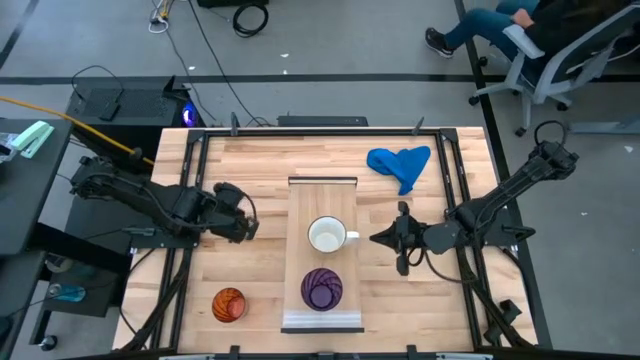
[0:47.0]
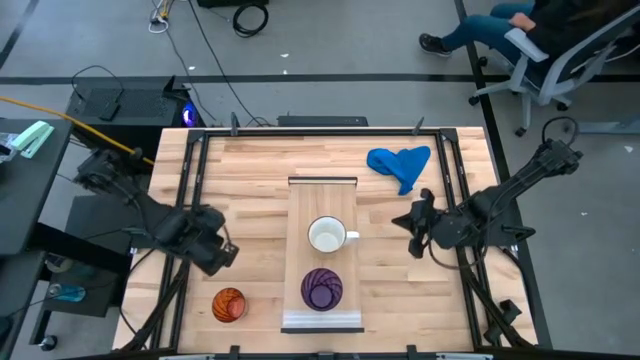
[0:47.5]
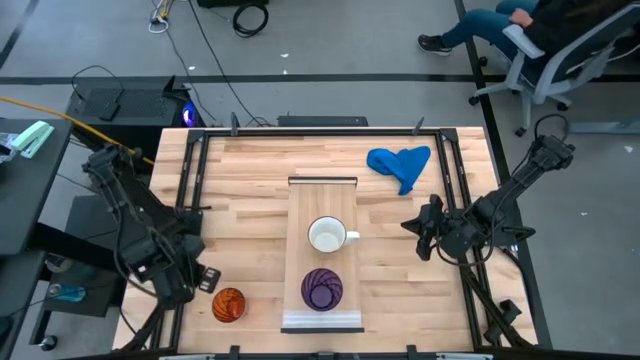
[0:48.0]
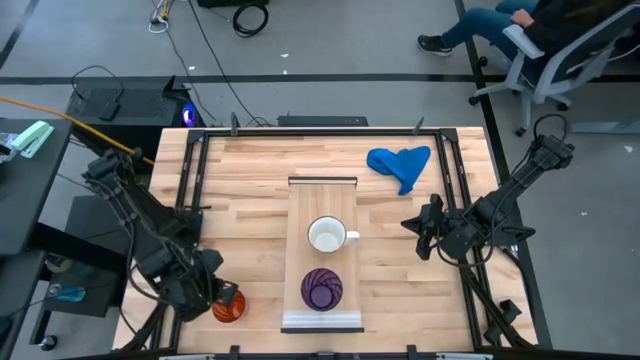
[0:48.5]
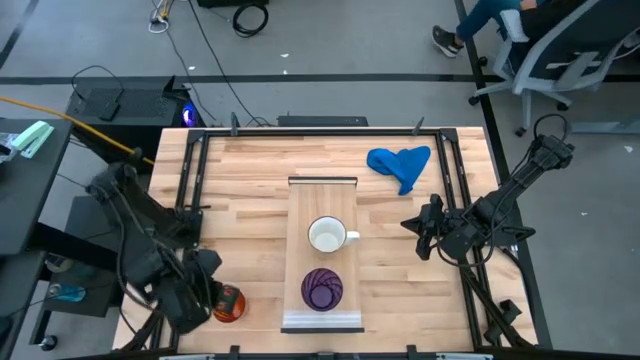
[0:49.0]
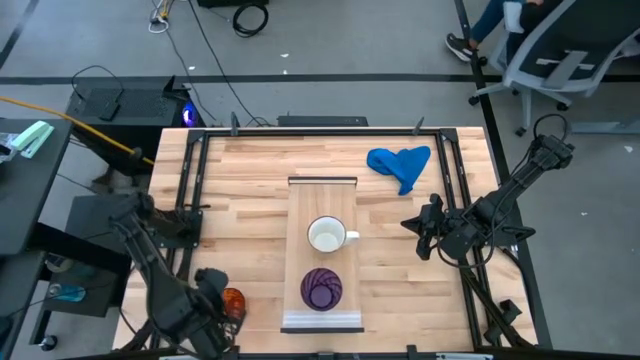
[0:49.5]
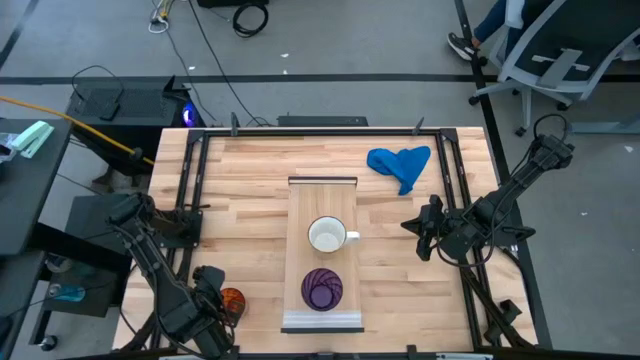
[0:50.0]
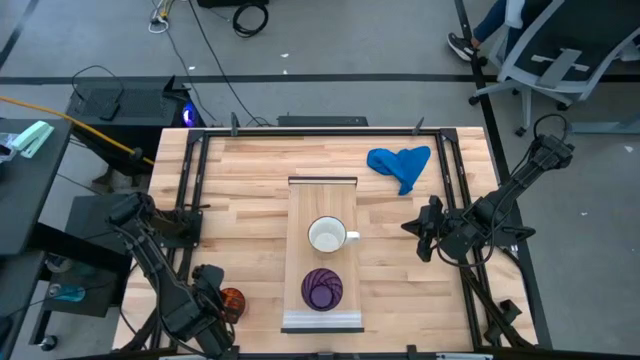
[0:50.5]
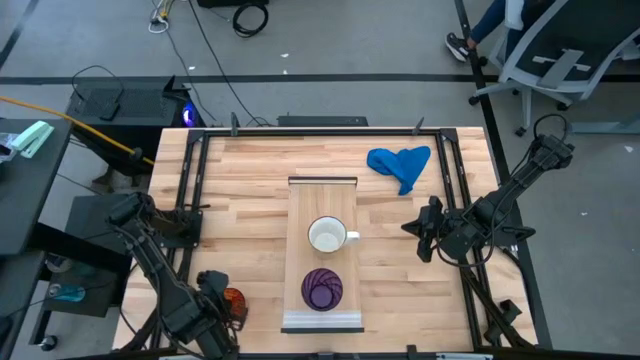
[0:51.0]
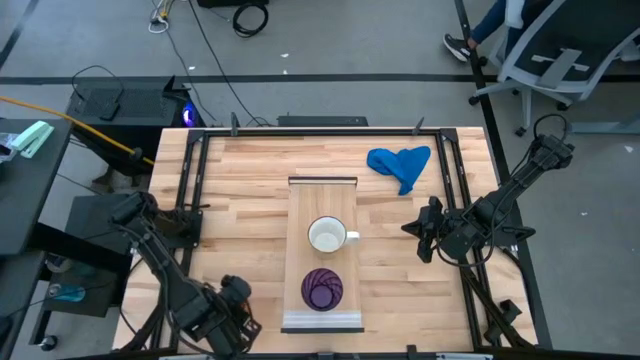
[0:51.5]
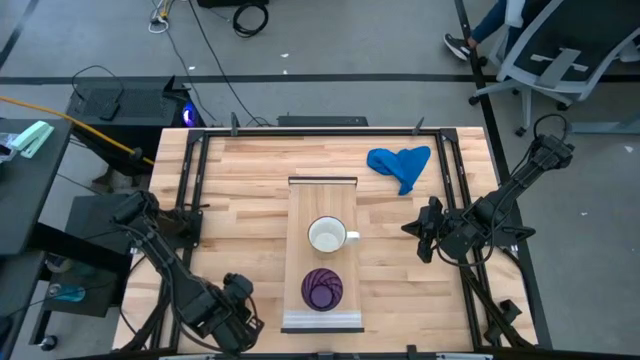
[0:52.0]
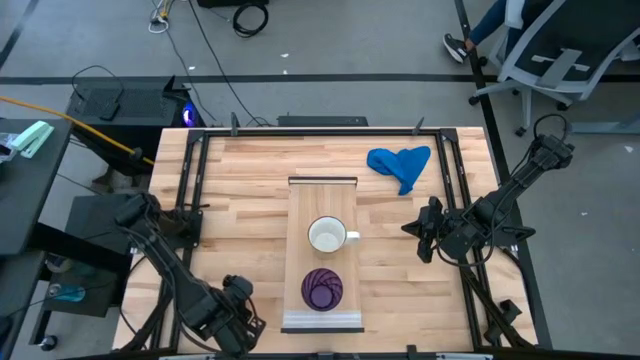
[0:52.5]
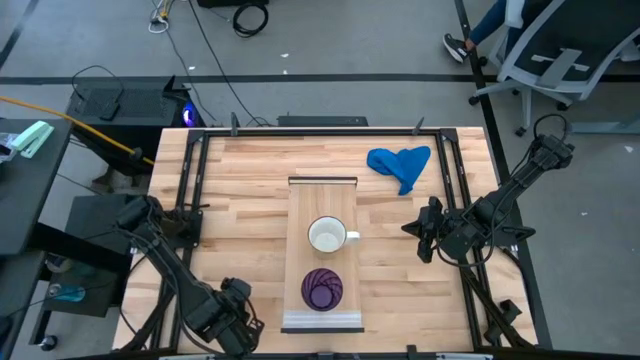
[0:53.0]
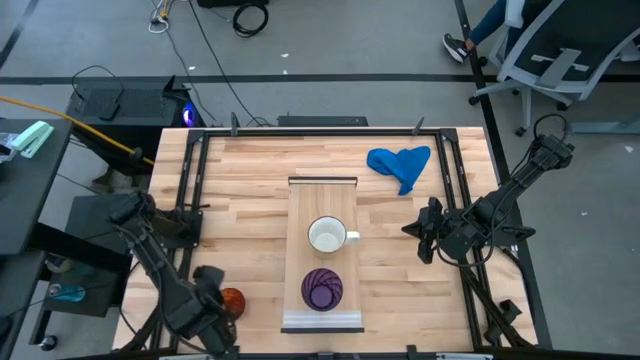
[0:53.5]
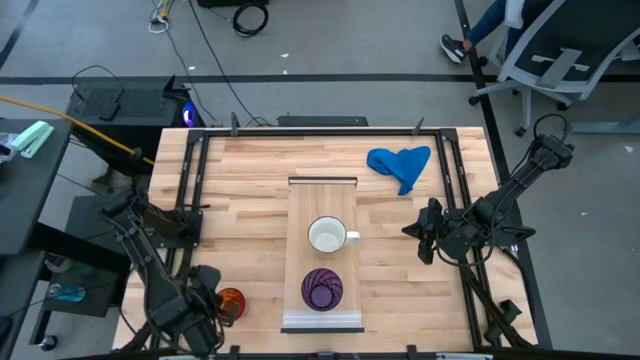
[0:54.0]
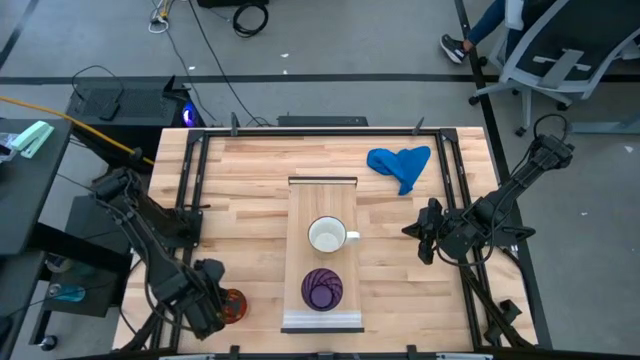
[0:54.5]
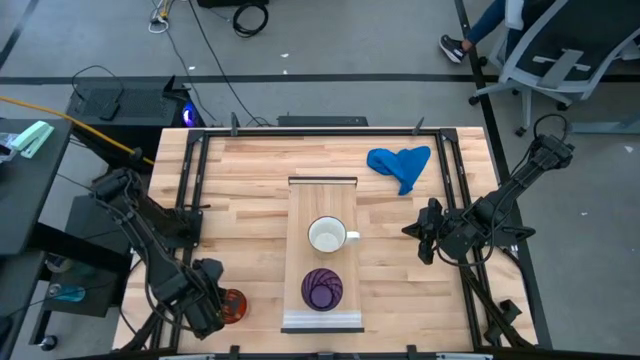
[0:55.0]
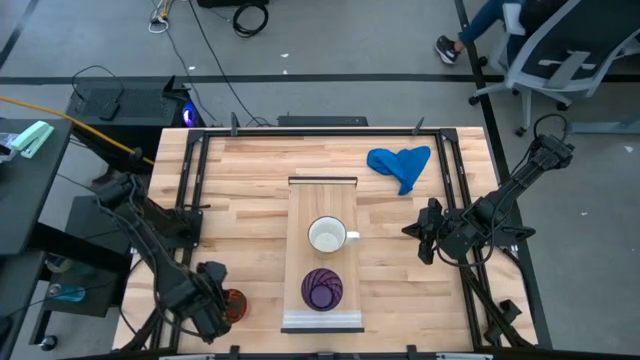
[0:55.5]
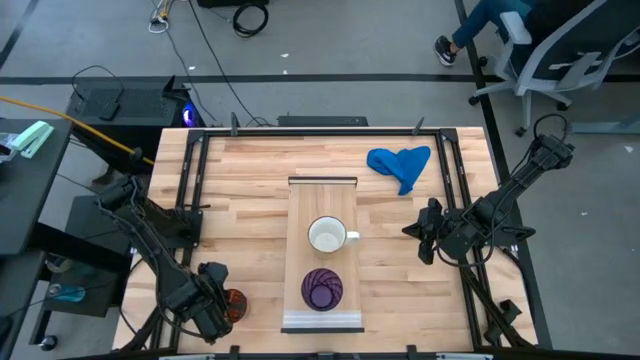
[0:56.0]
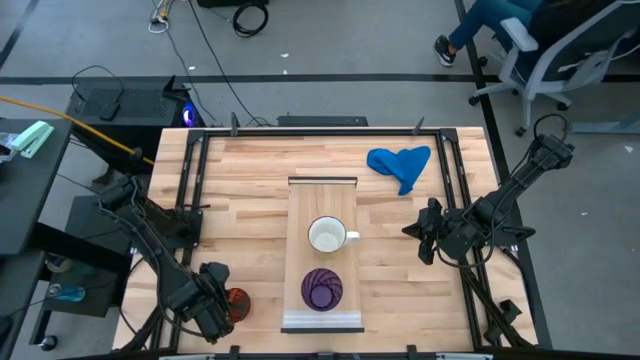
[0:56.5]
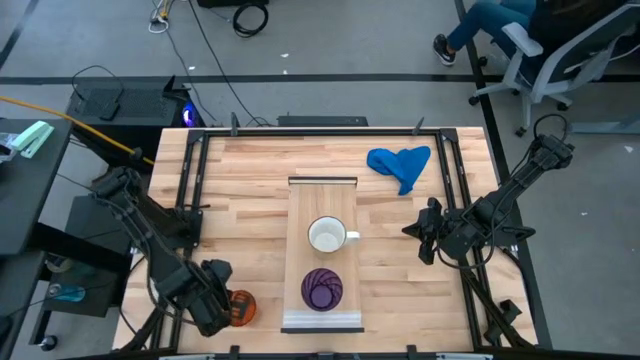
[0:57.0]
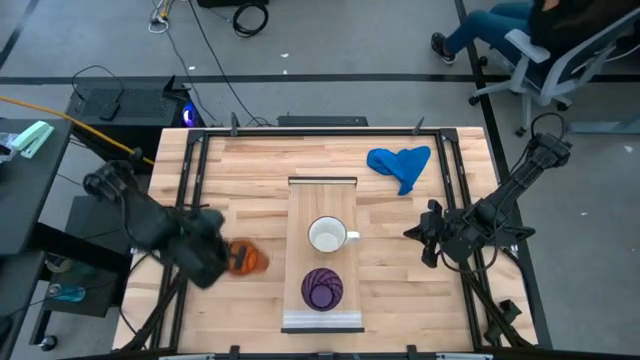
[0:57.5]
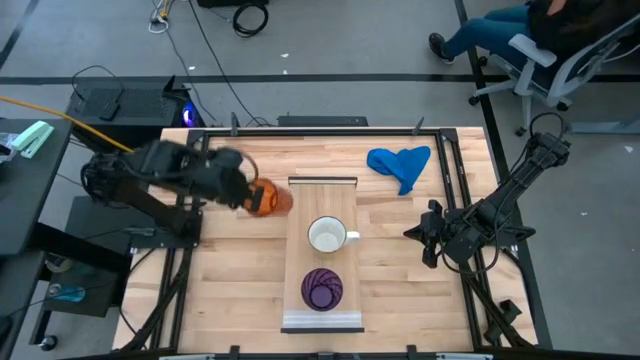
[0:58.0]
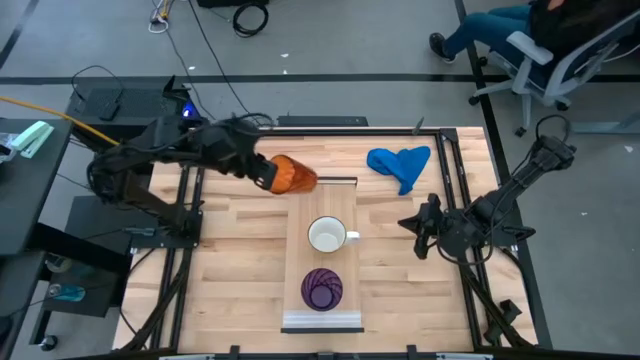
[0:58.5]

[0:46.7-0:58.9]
Task: Stack small to large cups/mugs on shelf
Put the orange cup on the shelf

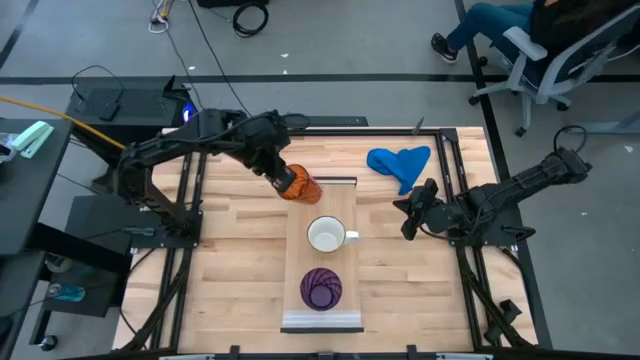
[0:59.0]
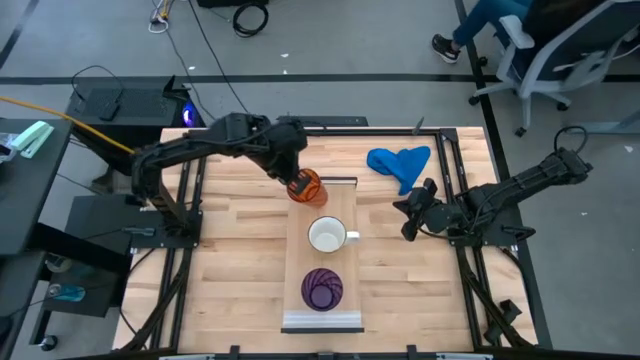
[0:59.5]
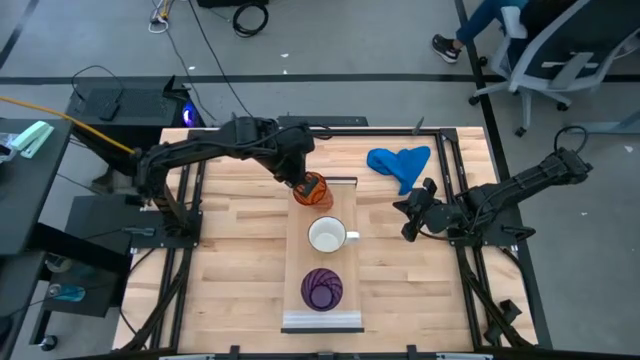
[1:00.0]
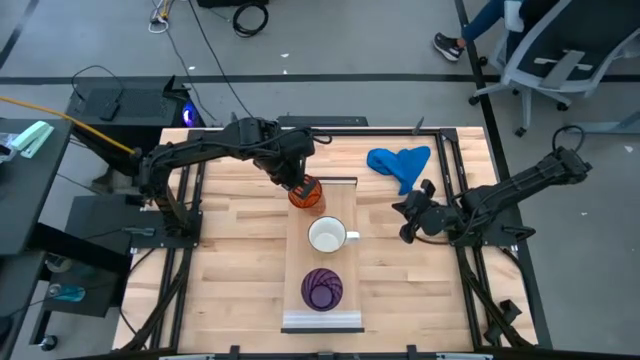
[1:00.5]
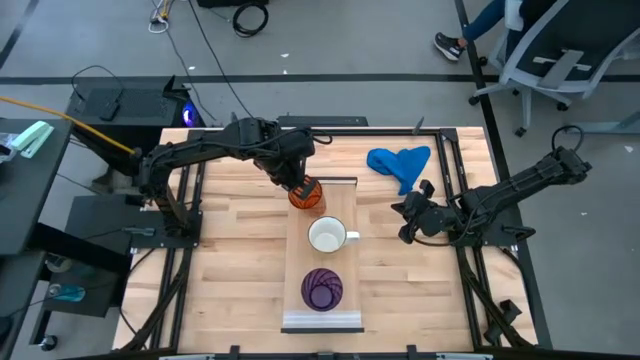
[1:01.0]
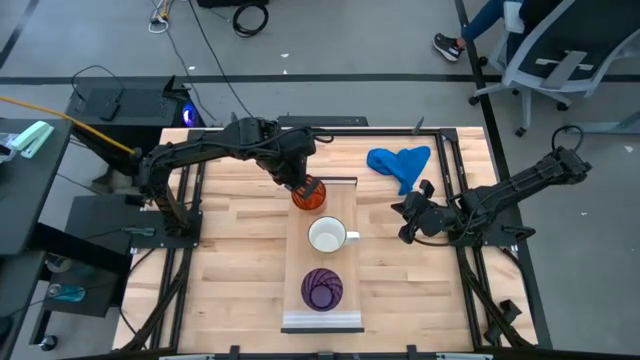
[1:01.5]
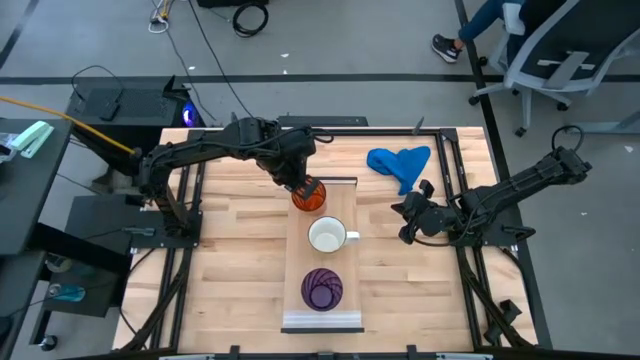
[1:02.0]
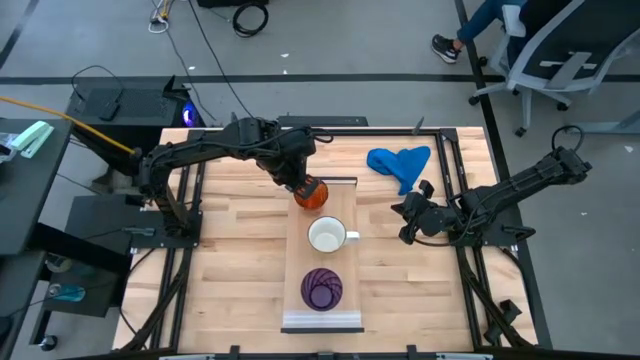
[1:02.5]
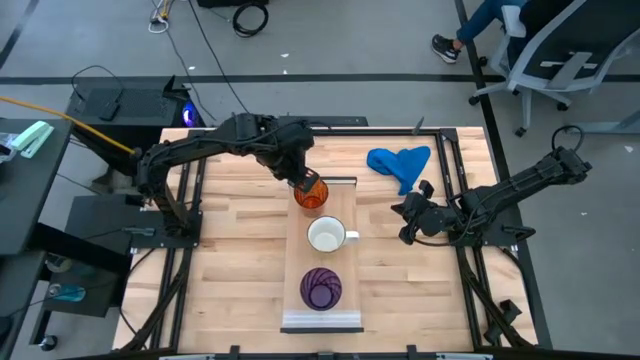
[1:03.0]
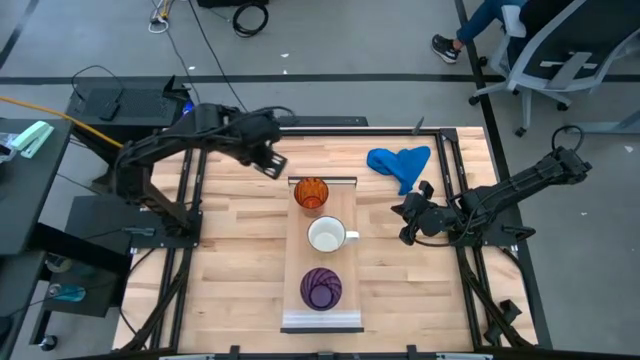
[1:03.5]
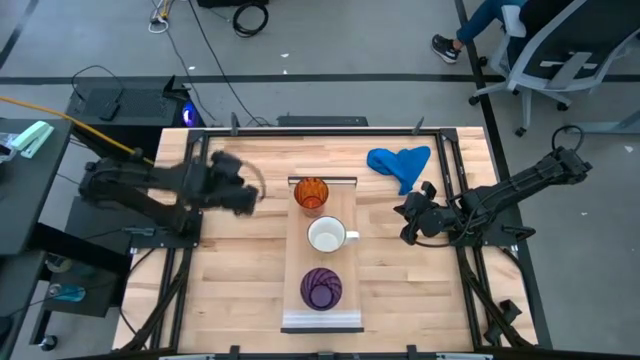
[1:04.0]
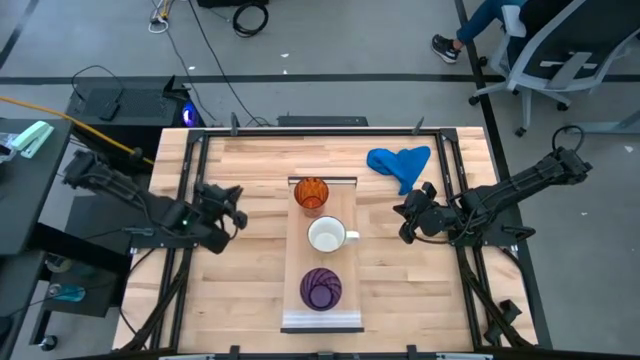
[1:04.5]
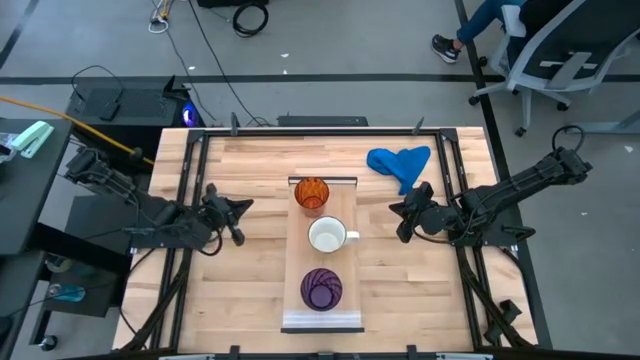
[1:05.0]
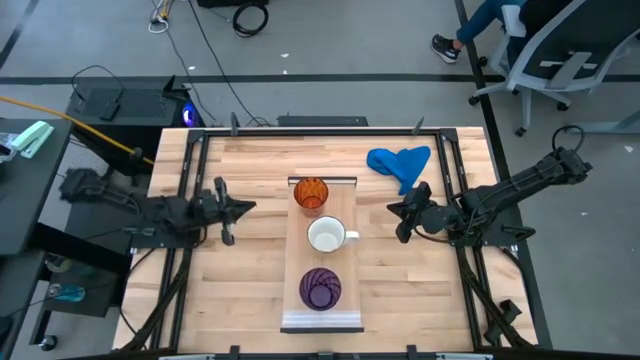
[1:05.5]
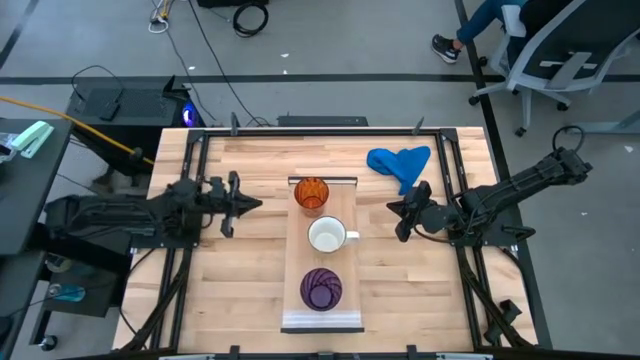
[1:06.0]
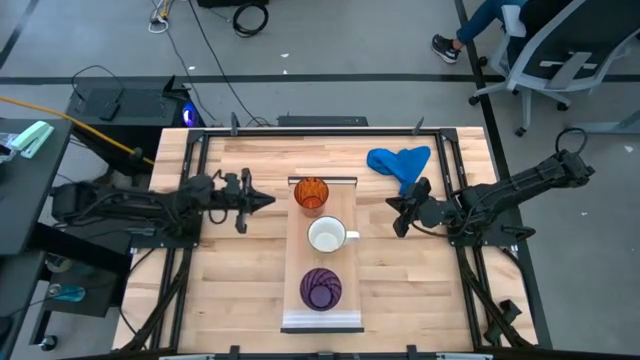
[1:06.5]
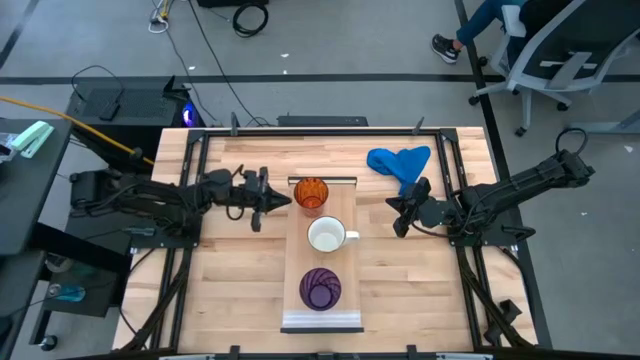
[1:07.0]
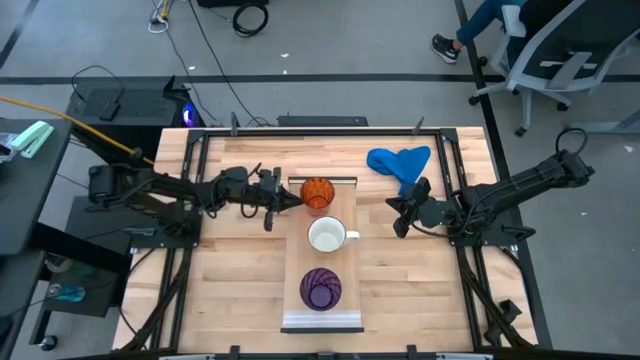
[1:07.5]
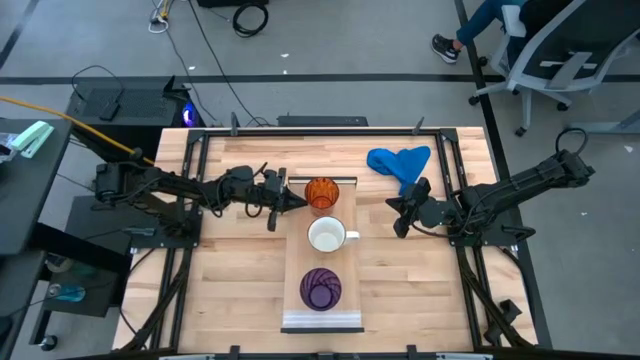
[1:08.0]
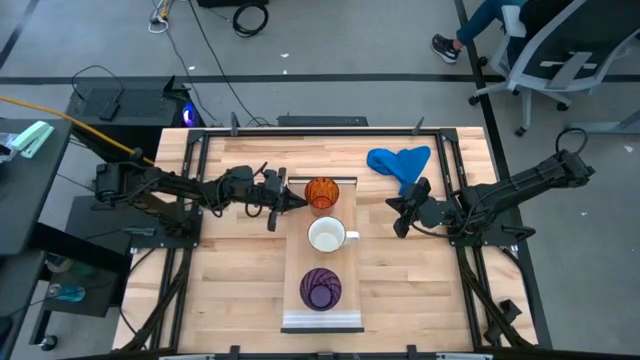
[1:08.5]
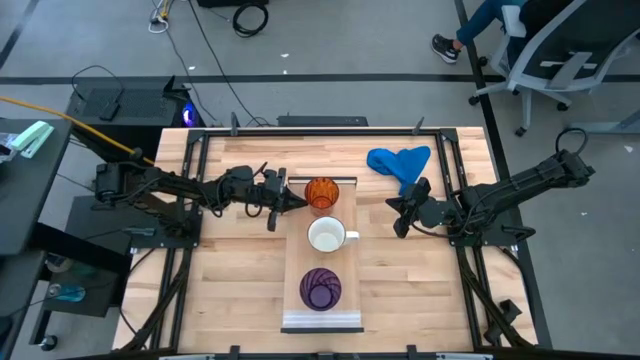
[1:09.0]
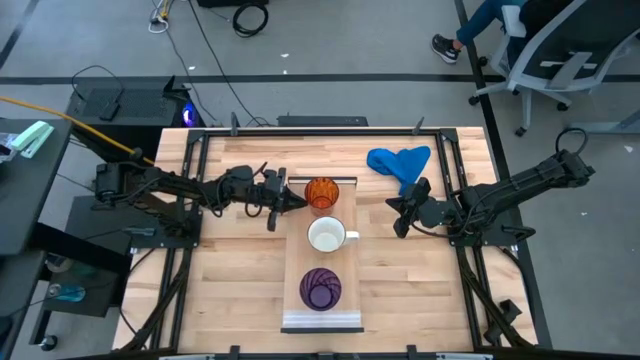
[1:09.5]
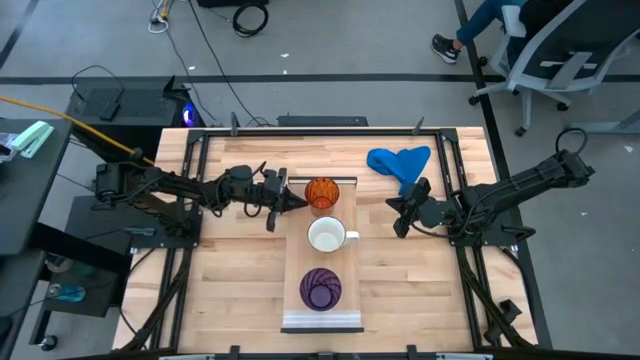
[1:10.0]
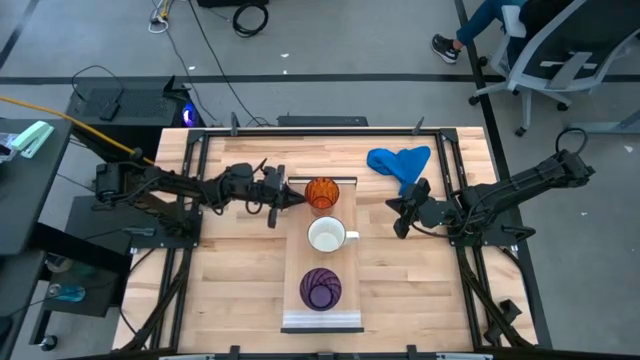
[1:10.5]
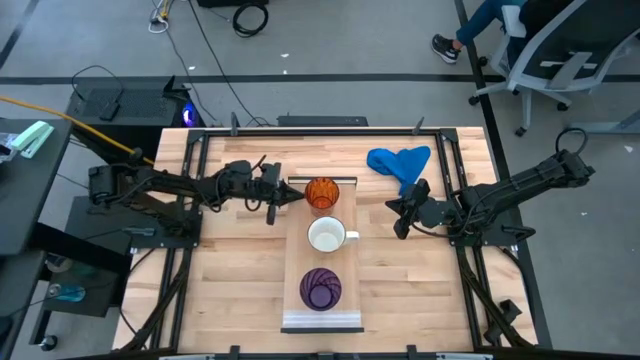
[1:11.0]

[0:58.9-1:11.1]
Put the orange cup on the shelf
